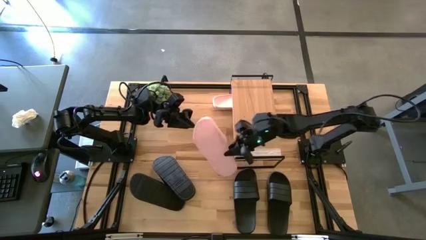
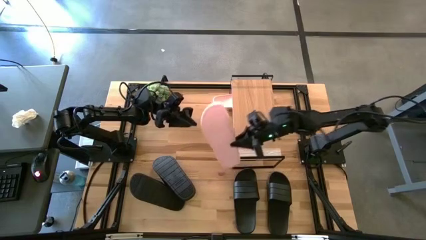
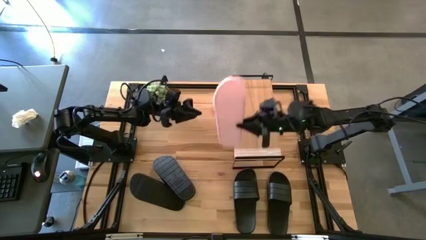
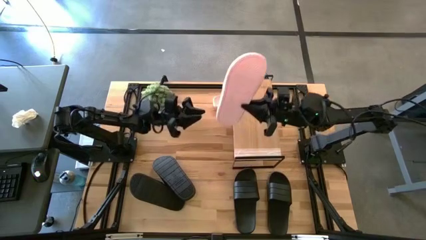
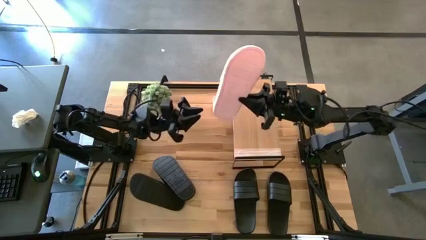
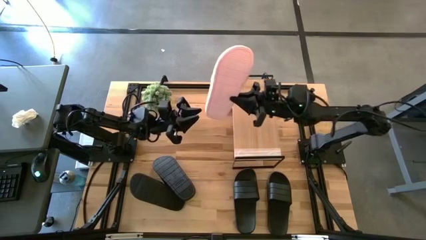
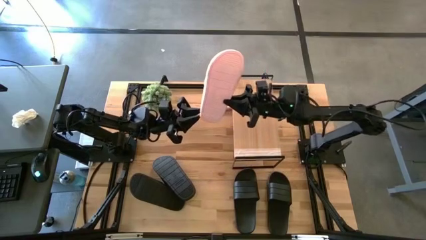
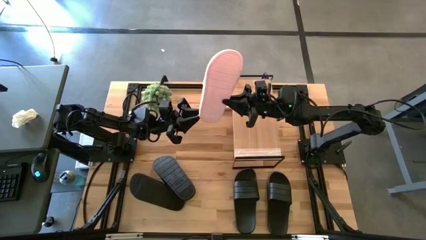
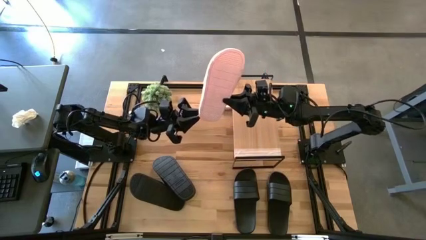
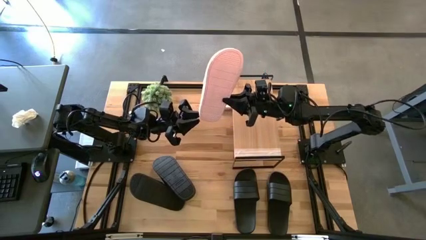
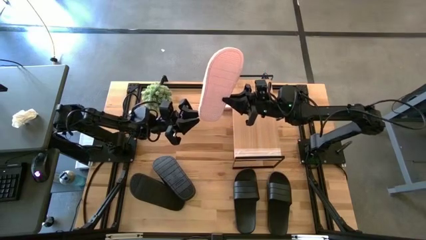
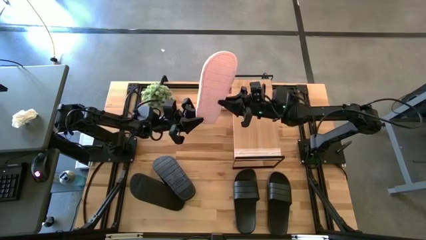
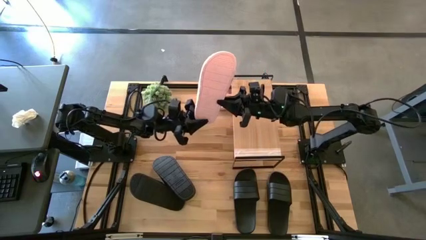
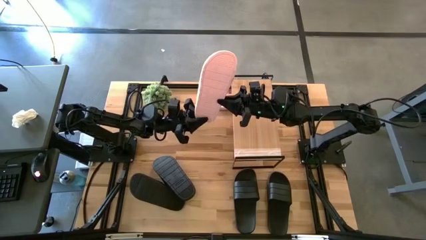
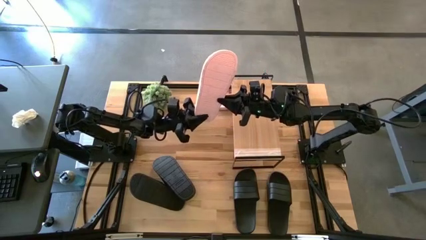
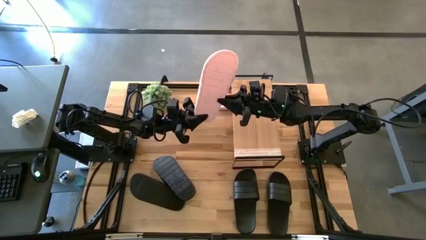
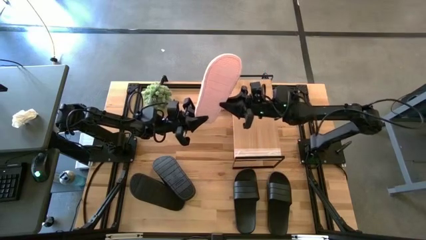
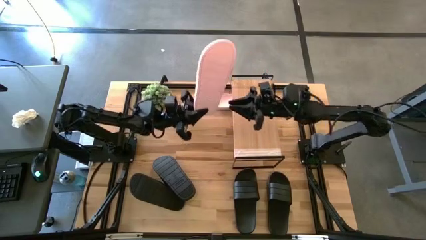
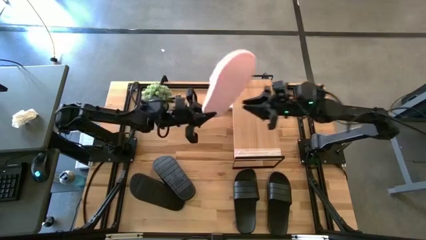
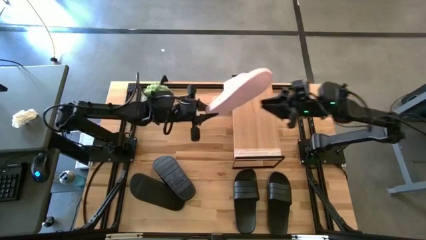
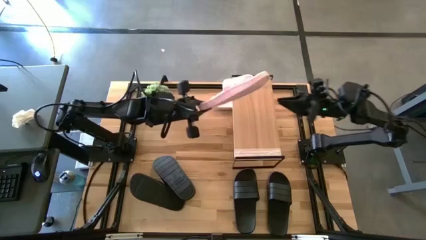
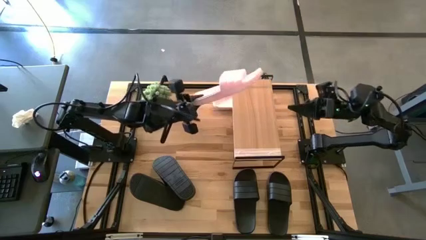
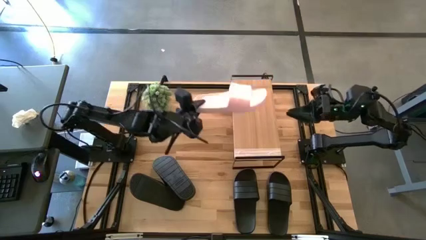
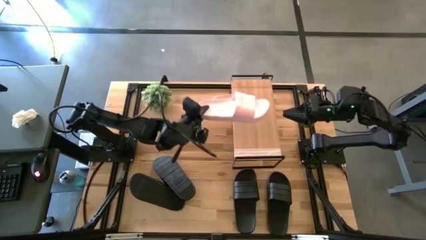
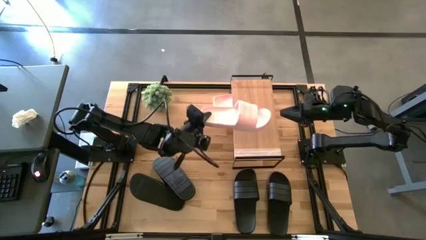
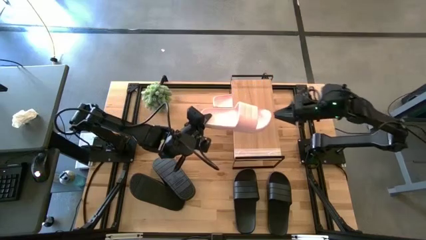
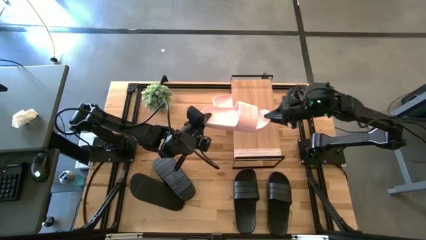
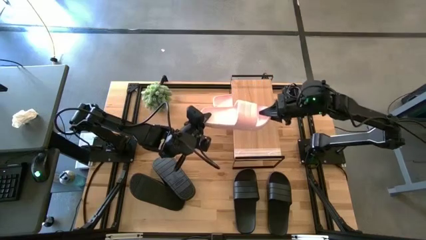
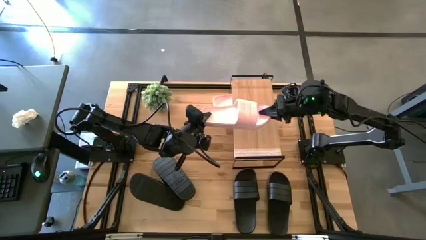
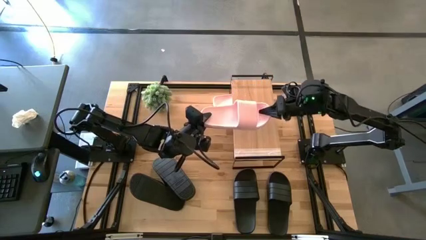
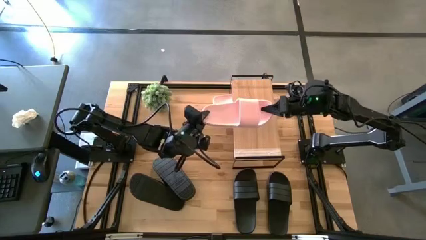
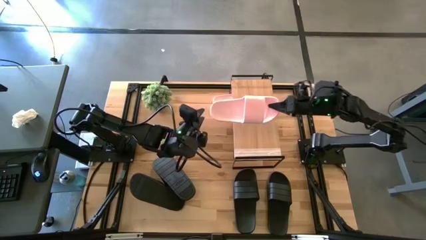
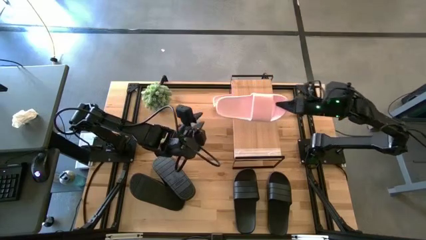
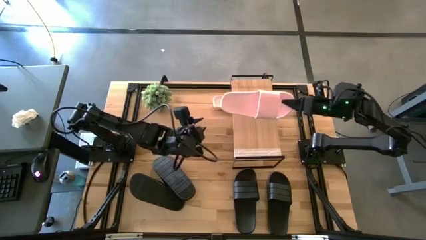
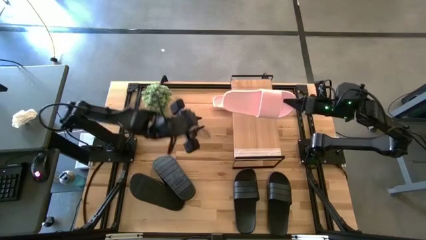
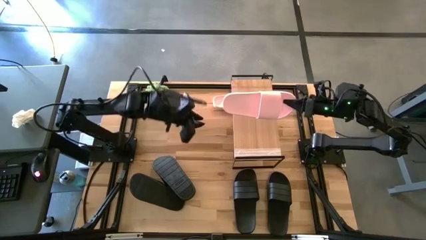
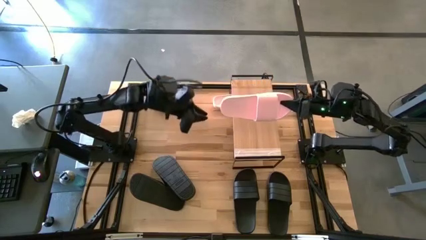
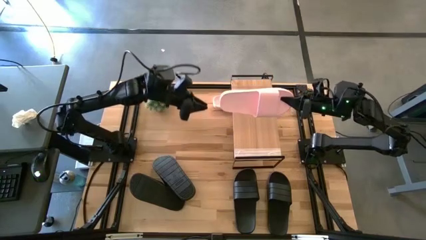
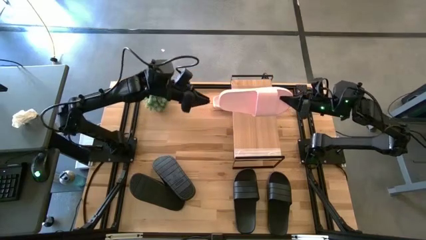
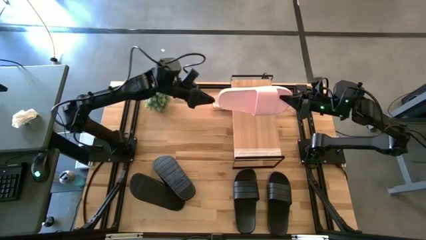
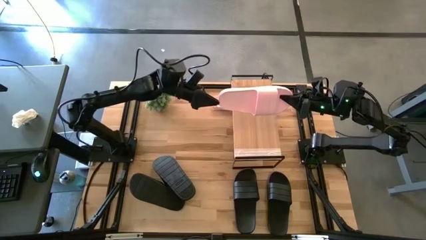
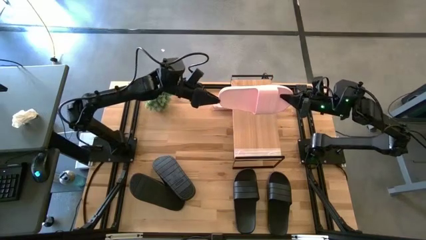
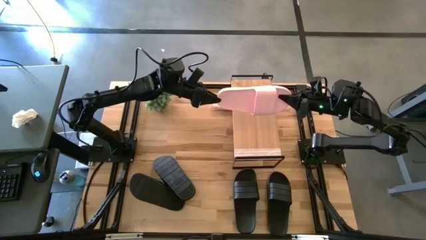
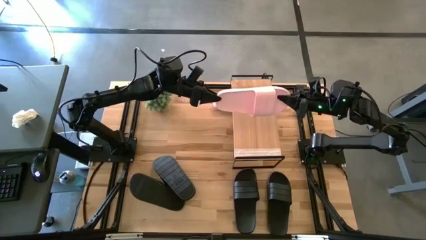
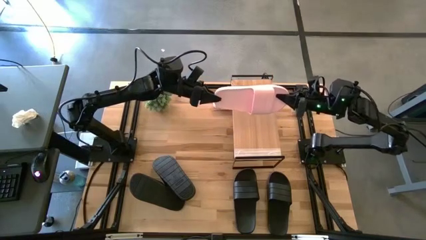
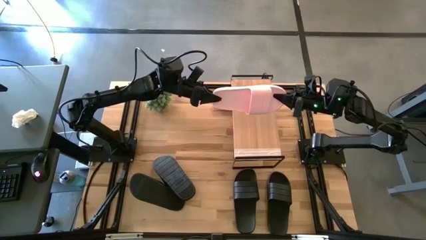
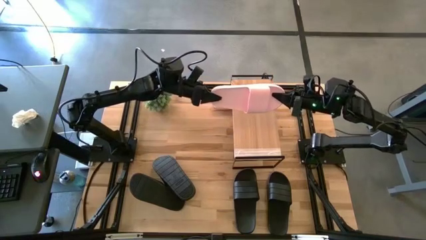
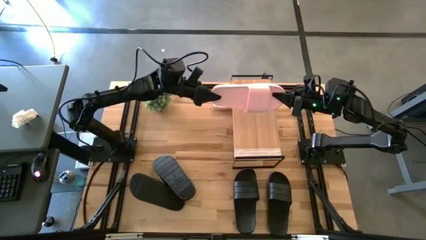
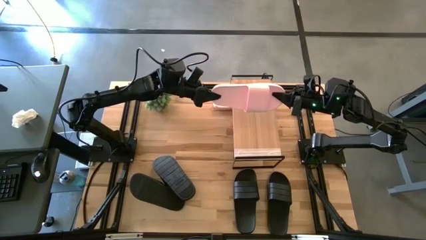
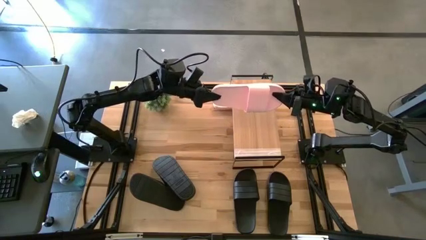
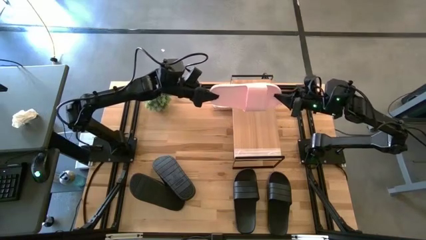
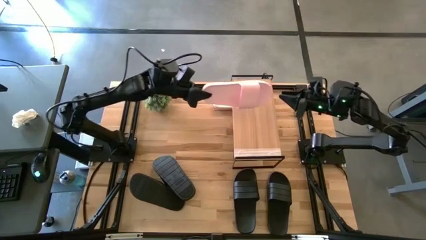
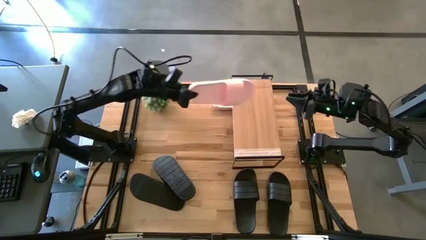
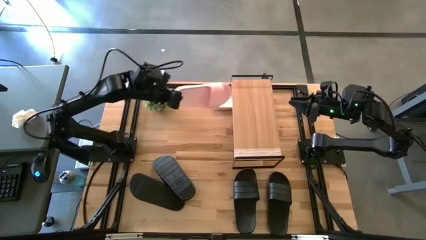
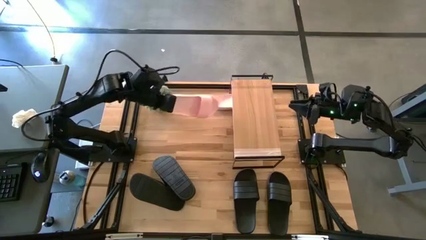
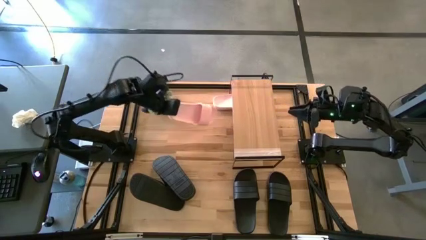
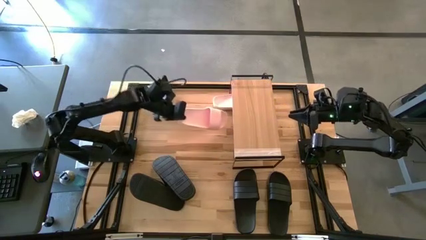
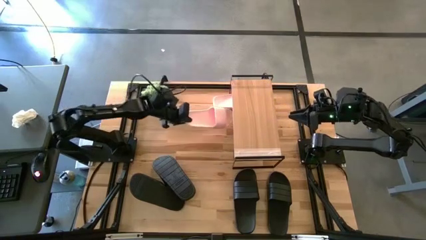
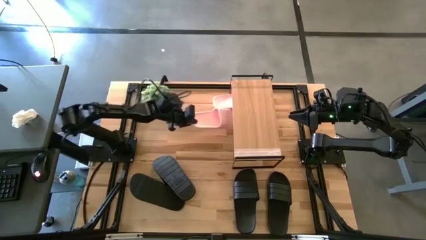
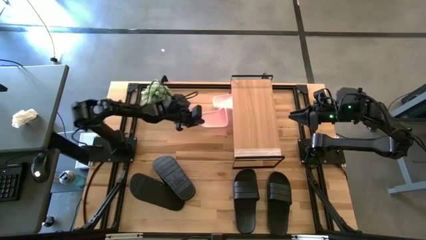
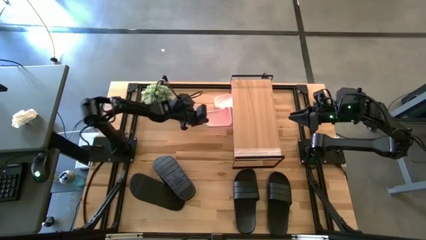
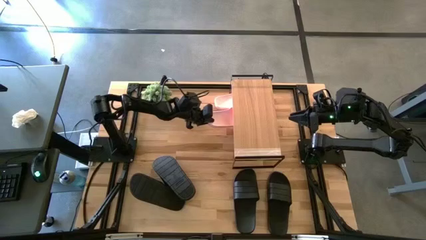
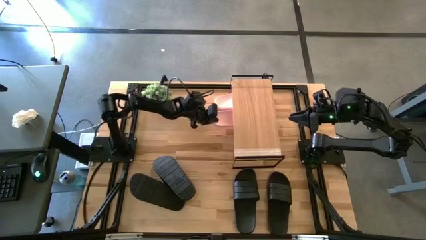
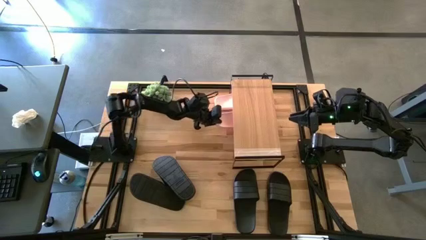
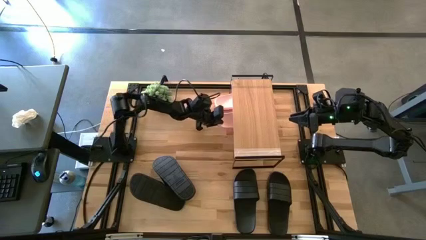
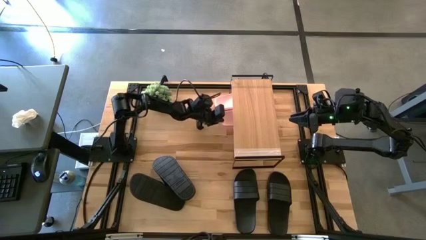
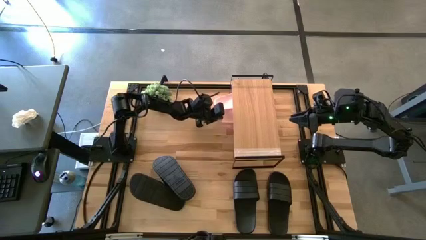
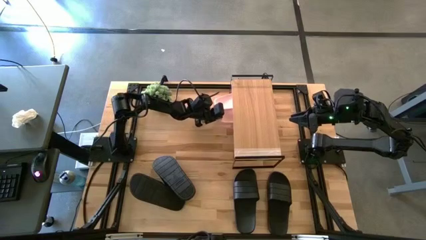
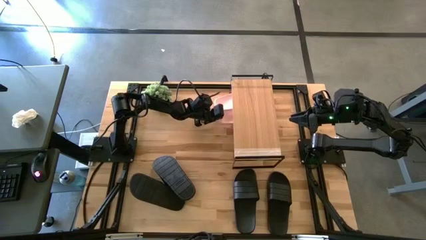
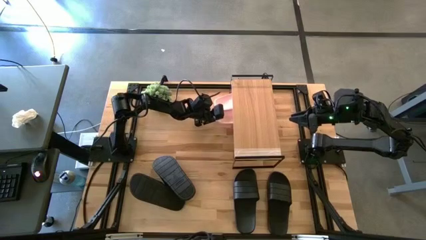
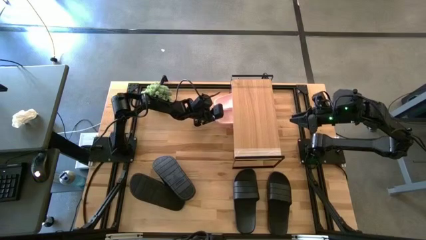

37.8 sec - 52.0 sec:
Task: Pick and place slides into the shelf
Put the pink slipper under the shelf
